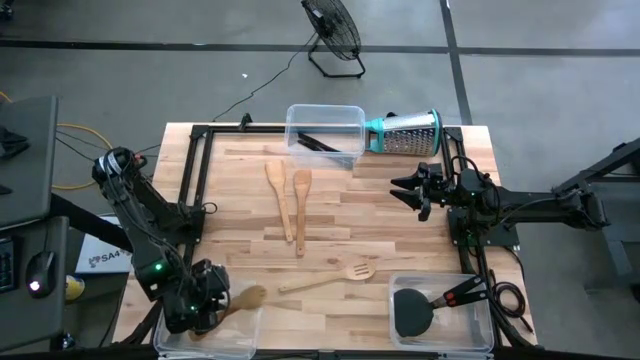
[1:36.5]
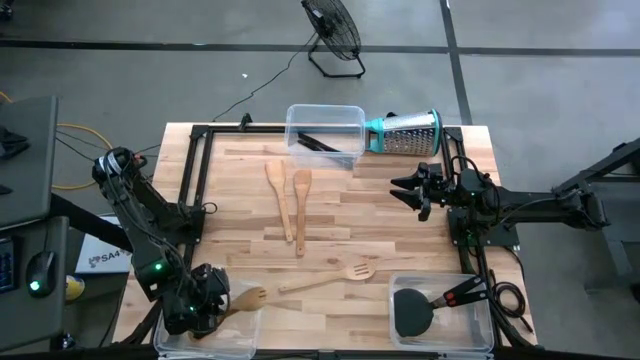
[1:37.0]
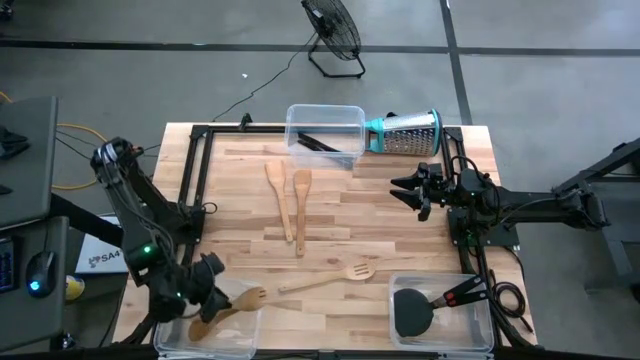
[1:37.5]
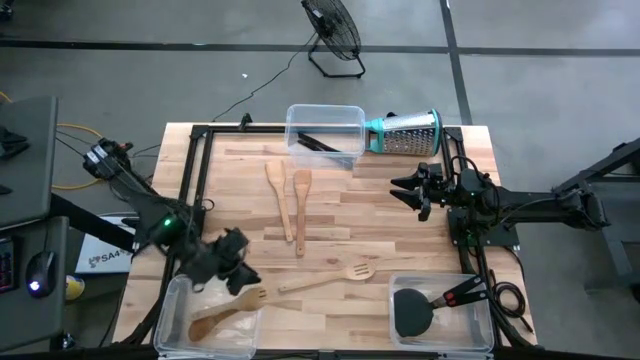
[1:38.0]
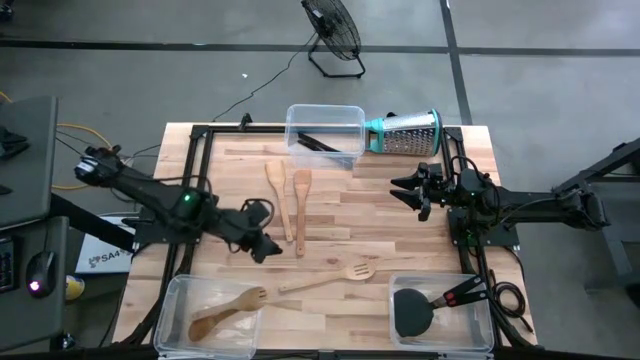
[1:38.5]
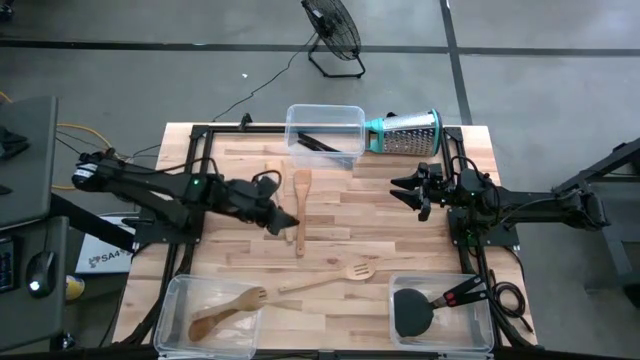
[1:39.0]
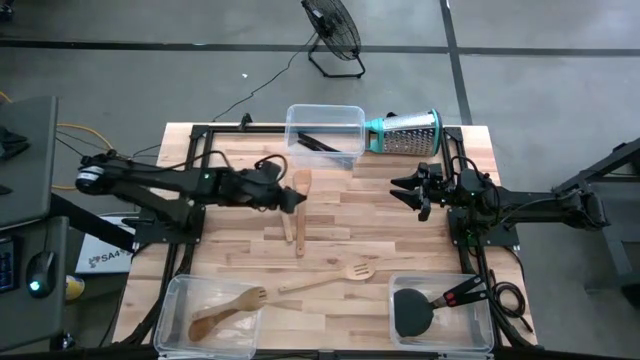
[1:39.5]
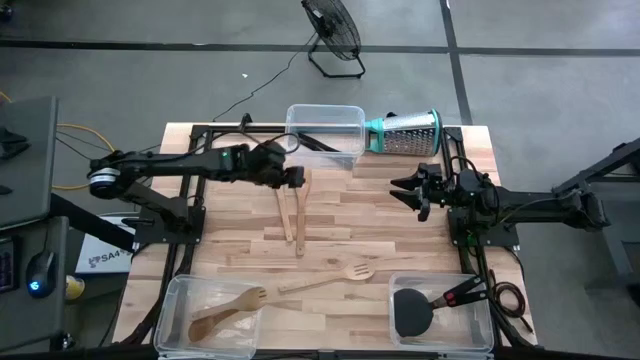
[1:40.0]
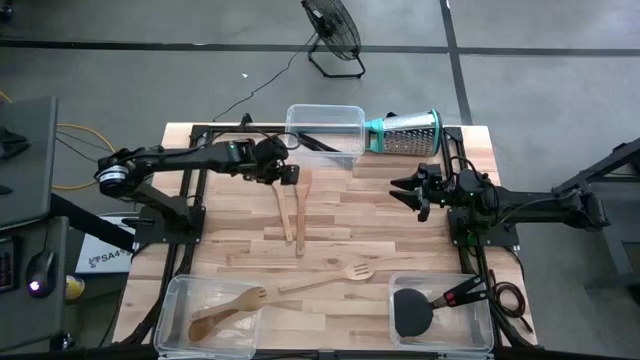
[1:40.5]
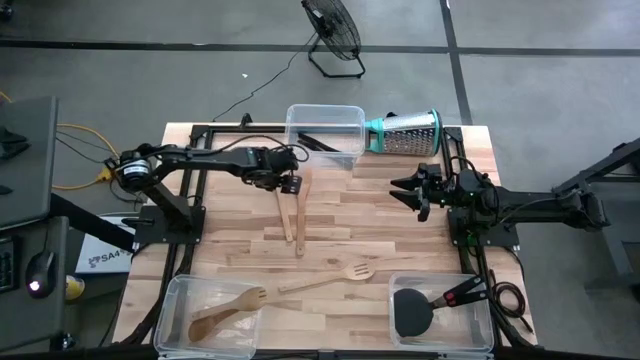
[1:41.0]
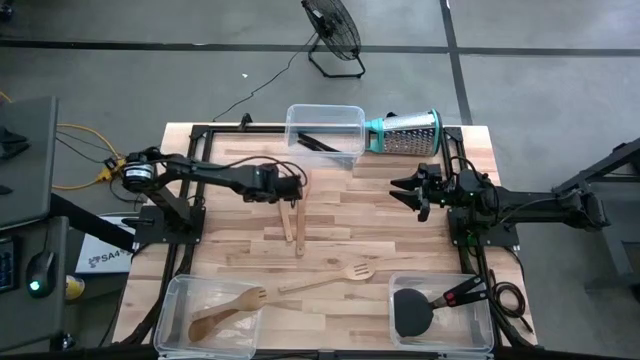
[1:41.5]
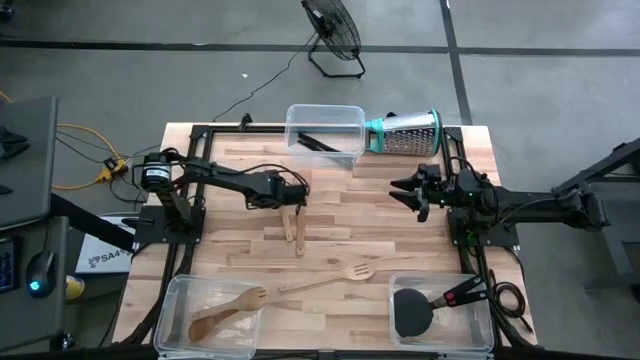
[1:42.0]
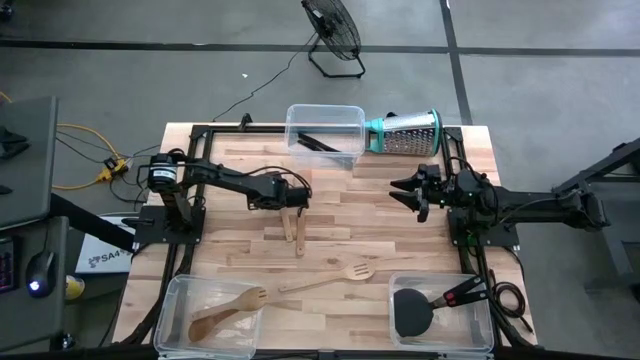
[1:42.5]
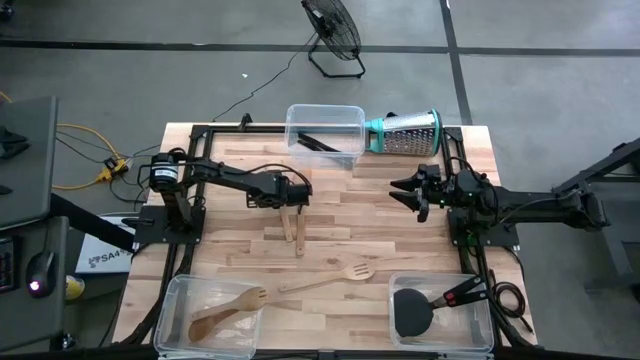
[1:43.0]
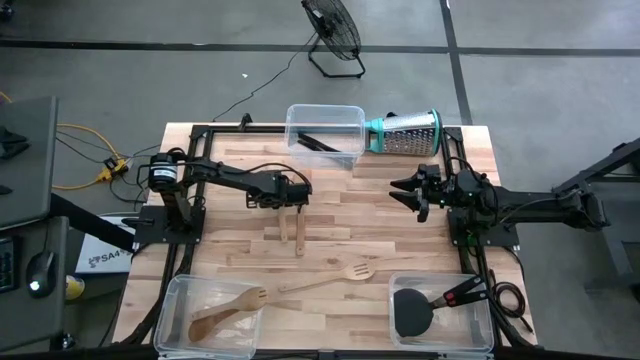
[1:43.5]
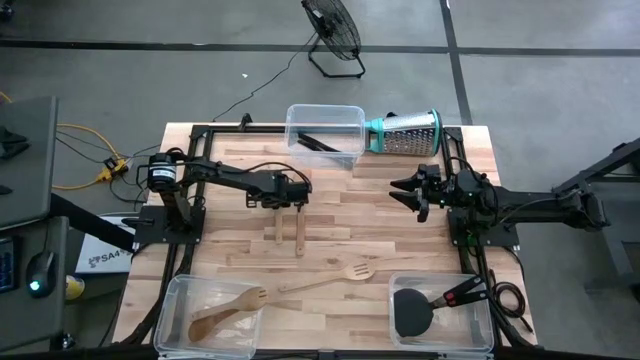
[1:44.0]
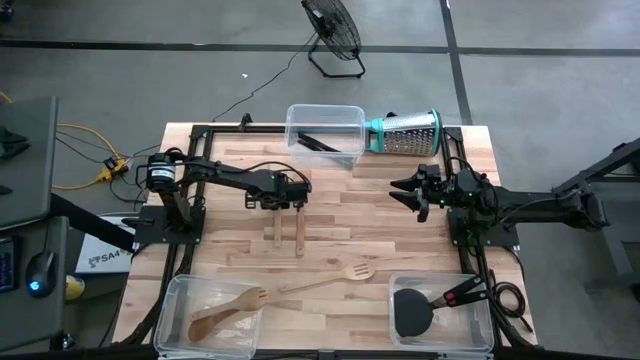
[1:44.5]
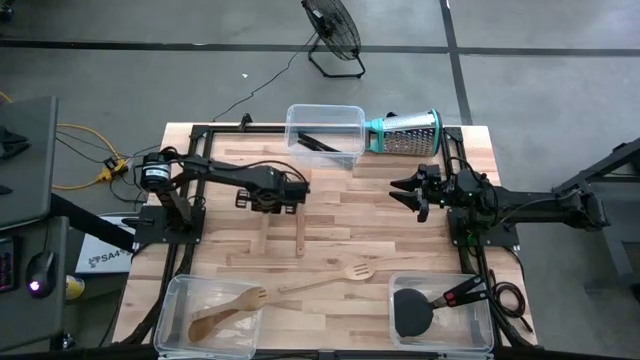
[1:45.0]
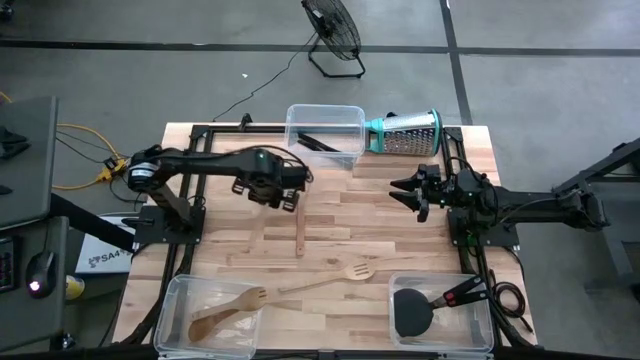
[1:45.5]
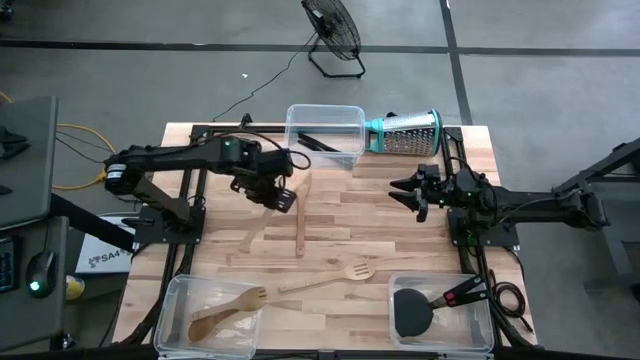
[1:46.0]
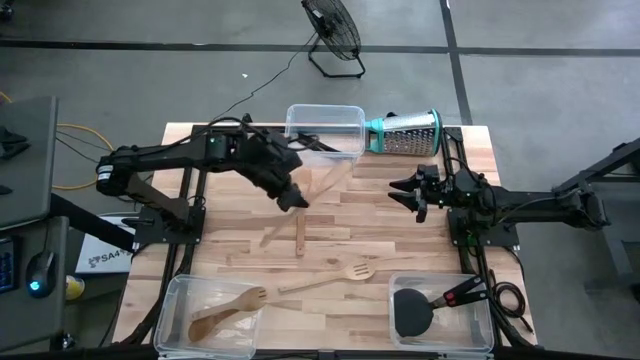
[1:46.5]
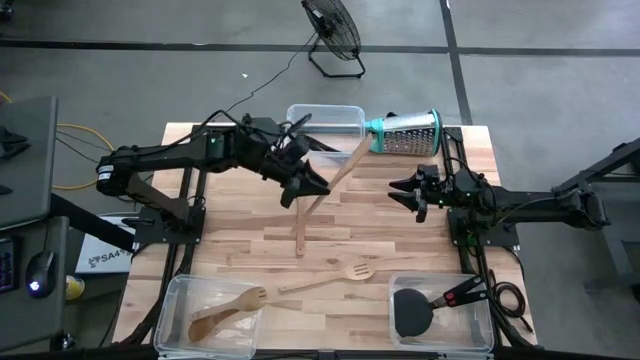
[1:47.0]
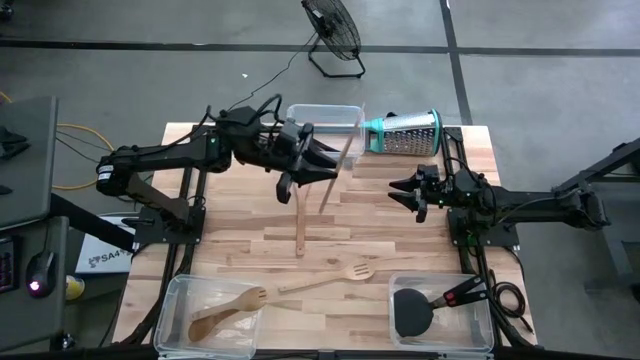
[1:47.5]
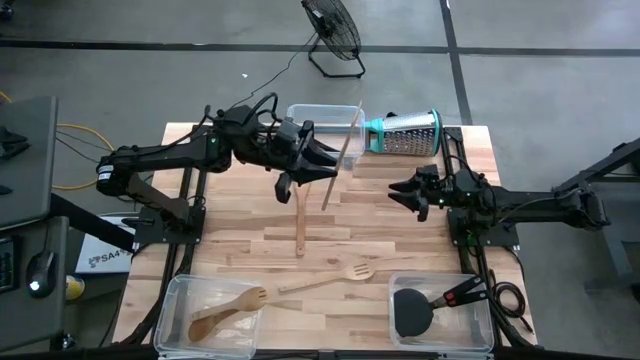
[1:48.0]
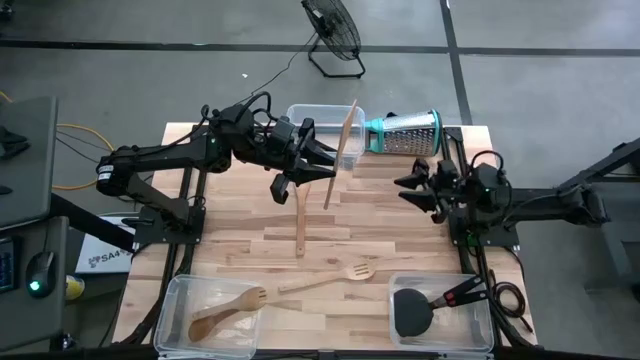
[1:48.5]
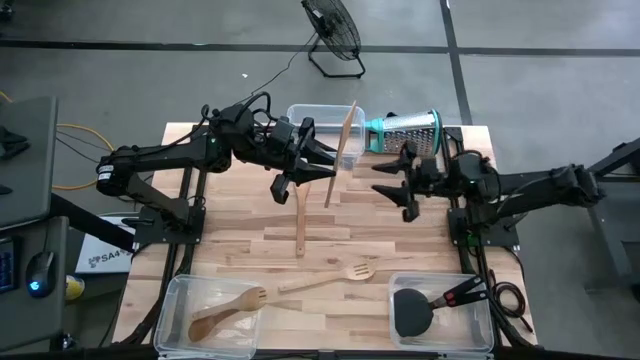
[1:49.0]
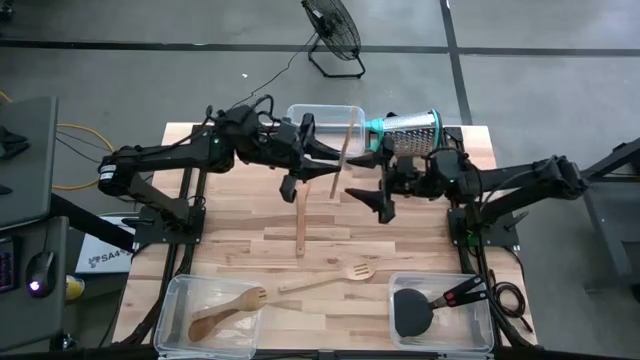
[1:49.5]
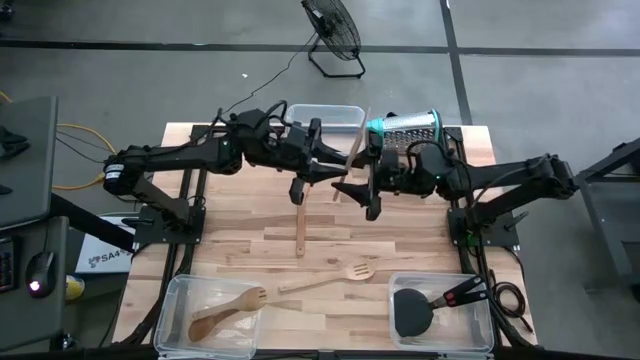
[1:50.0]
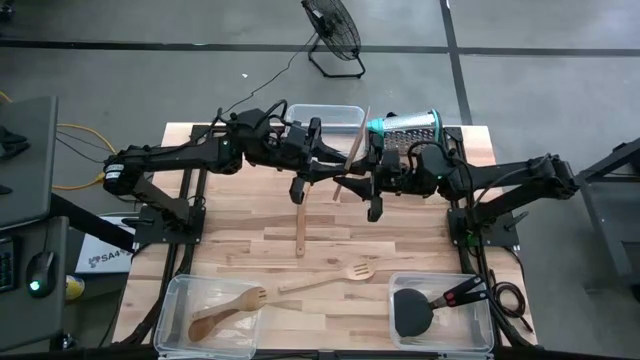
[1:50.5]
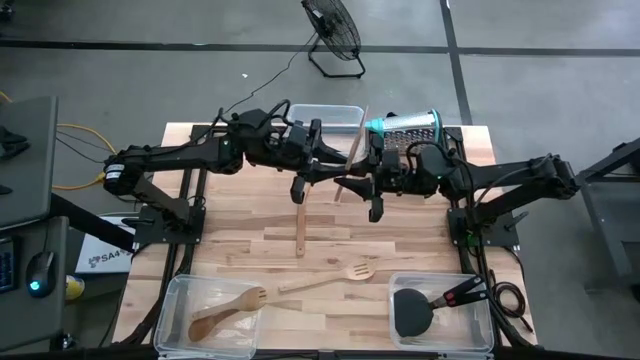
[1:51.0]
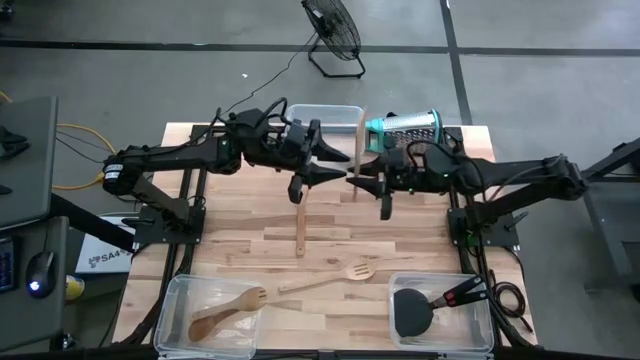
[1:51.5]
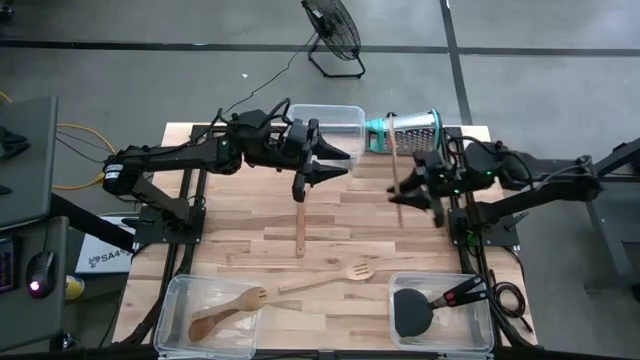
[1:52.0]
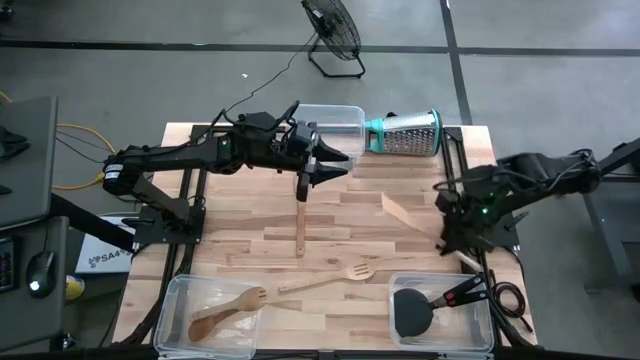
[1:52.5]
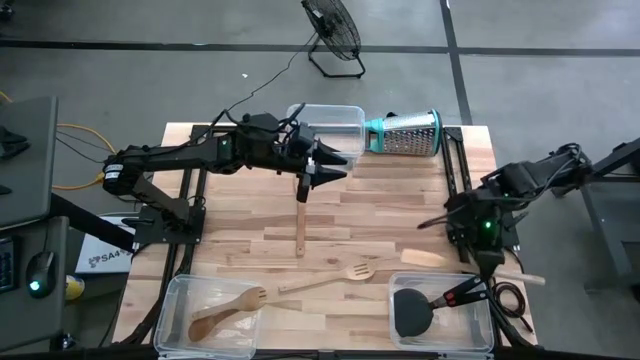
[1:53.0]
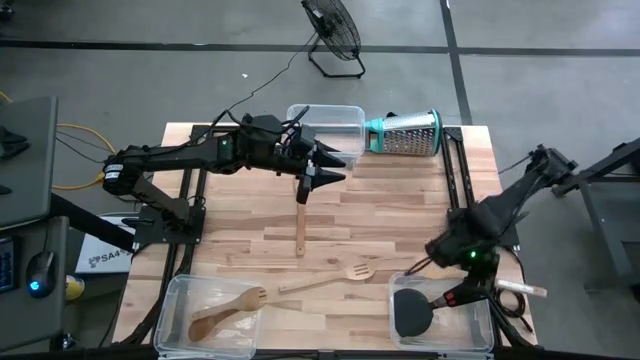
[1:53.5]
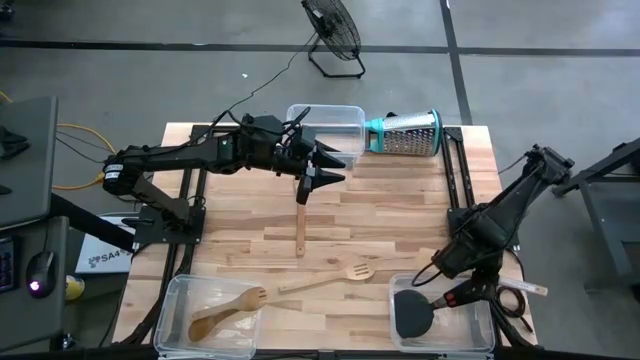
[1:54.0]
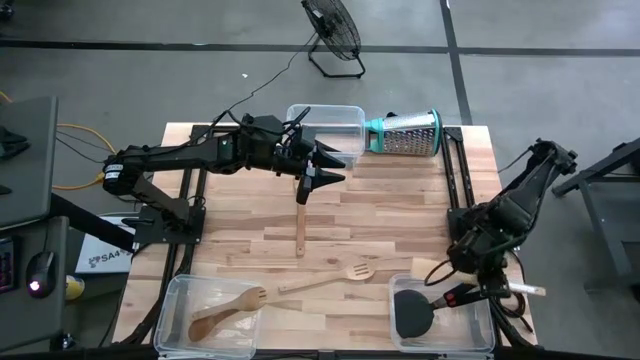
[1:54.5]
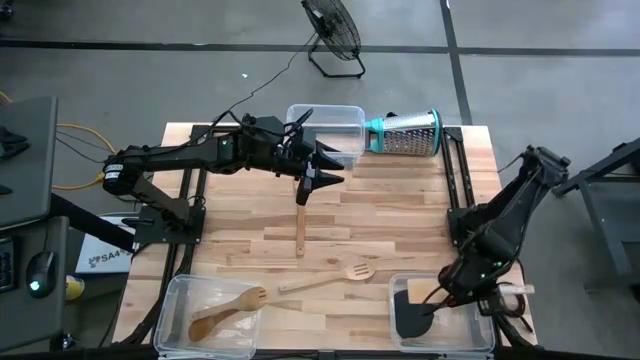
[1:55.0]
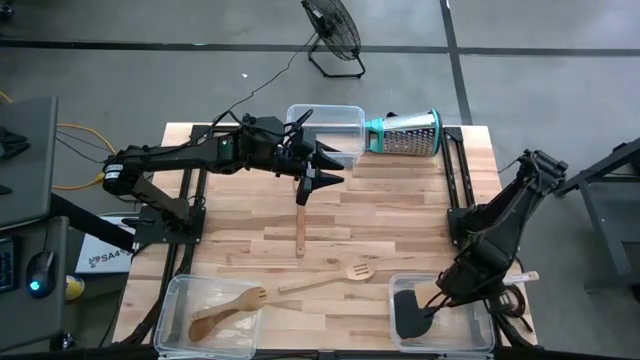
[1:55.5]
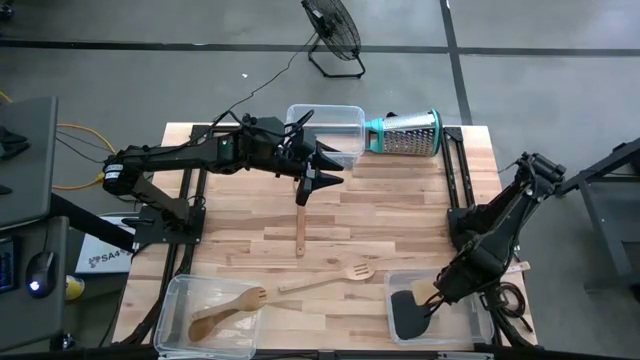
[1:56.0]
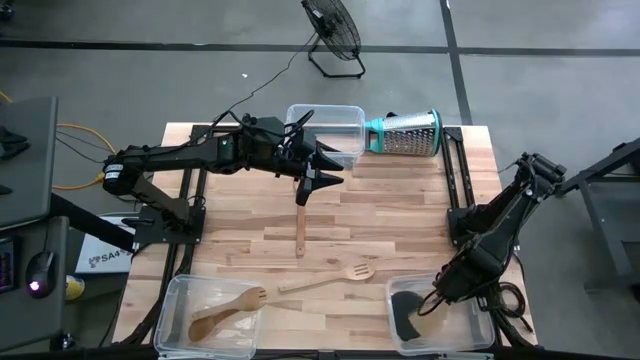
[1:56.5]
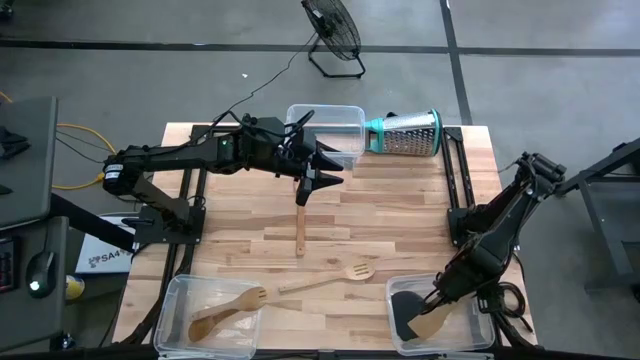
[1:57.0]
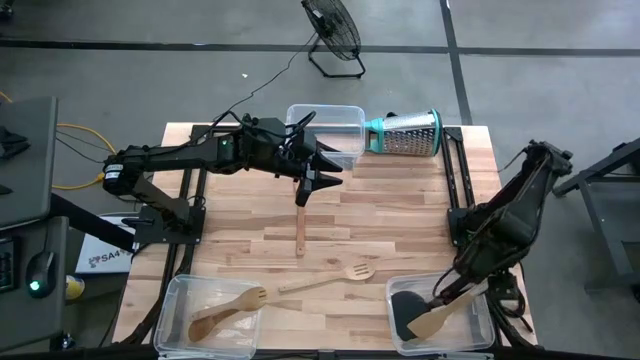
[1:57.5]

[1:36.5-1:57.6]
Task: Pick & Place Kitchen Items
Put the brown spatula into the bottom right transparent bin
